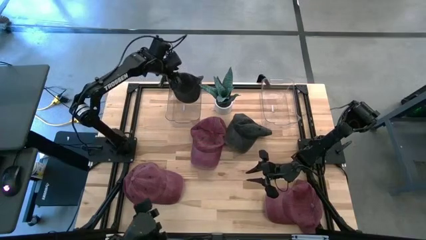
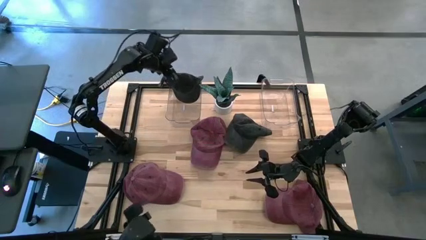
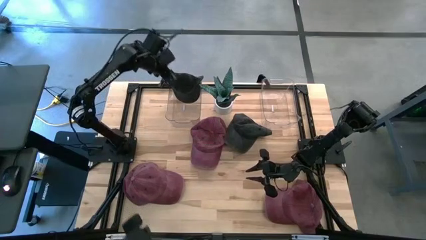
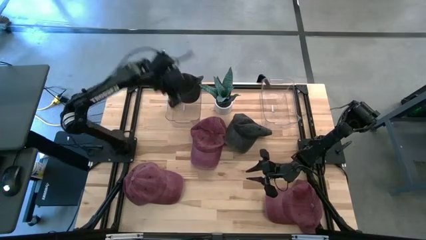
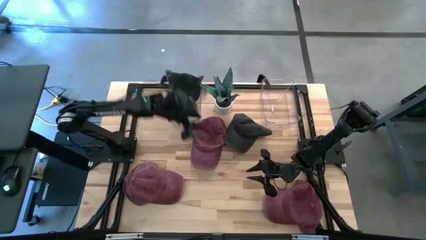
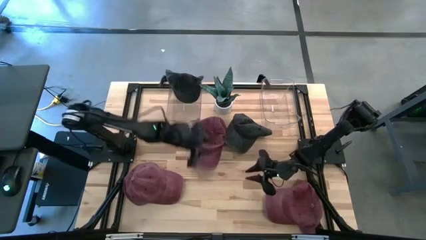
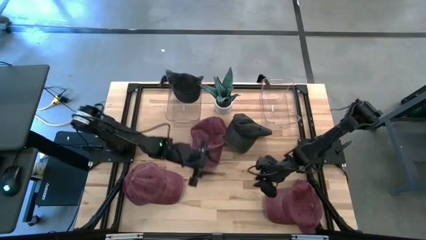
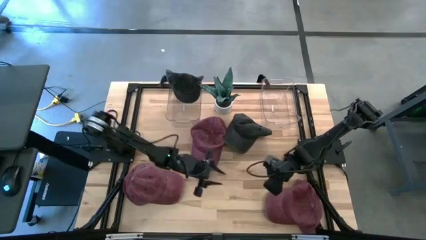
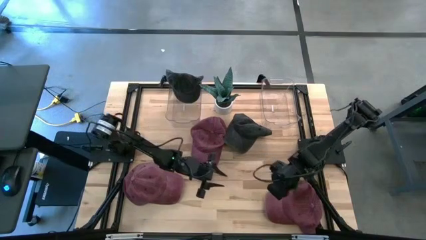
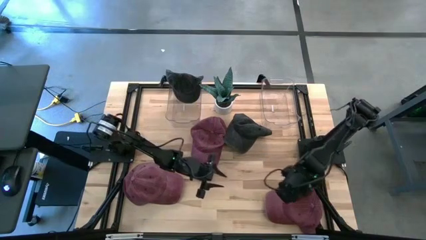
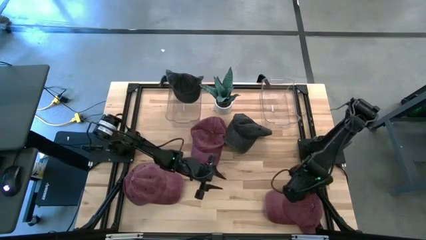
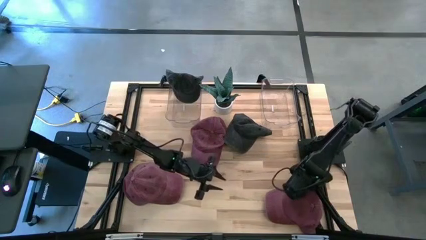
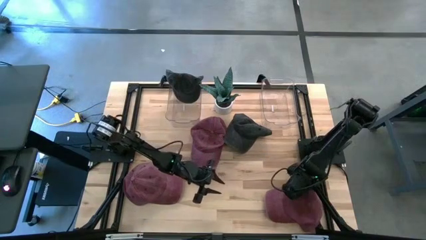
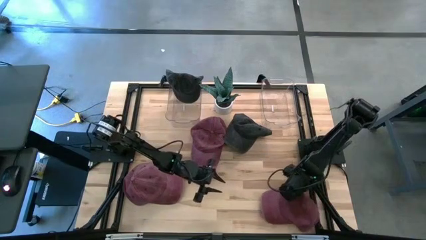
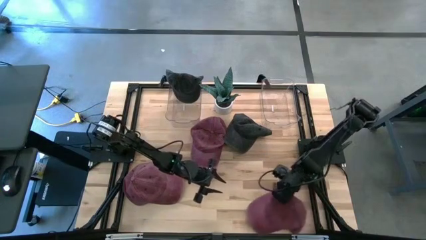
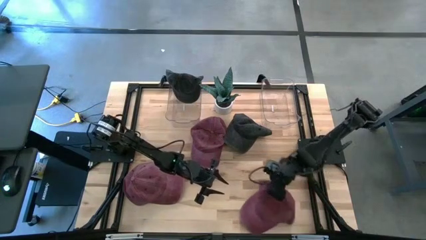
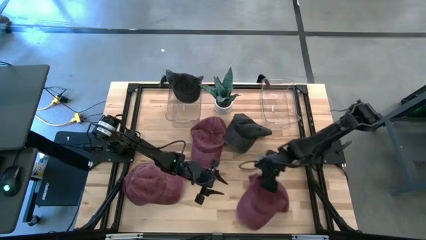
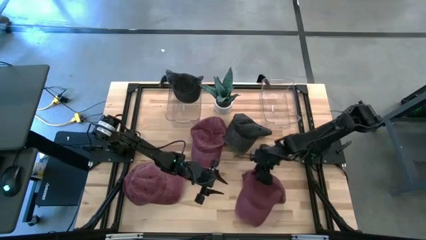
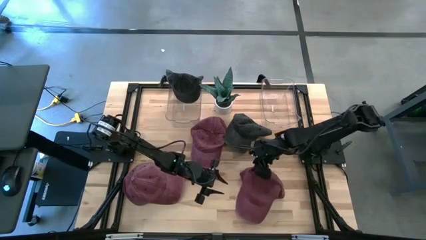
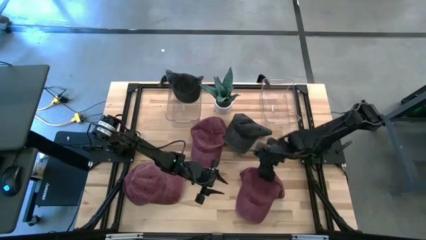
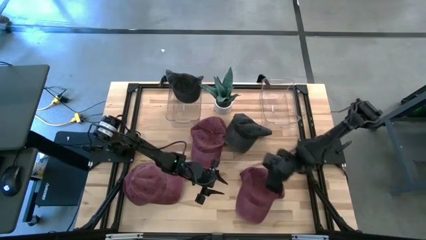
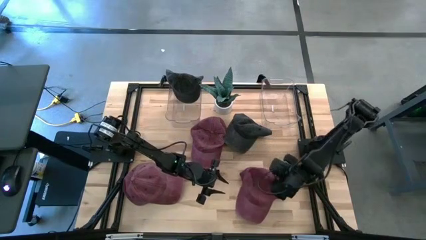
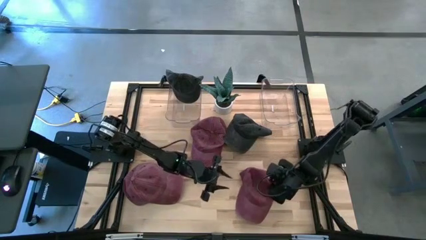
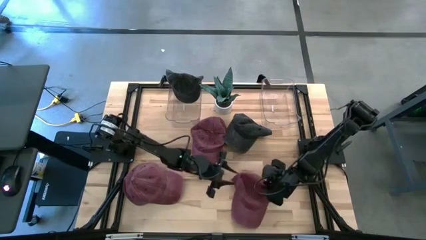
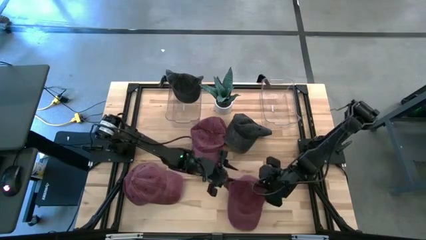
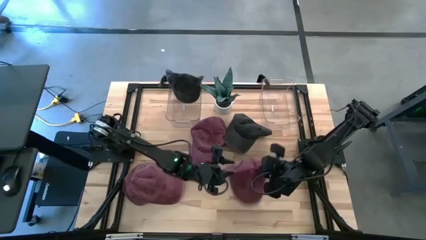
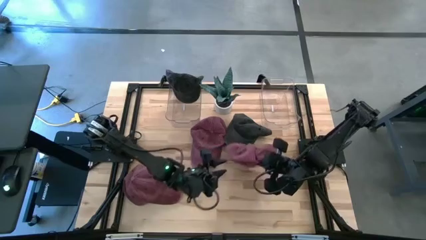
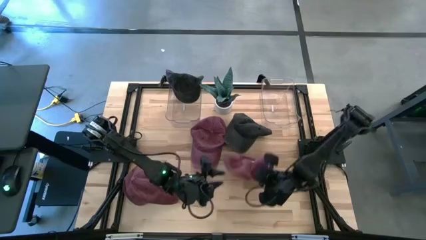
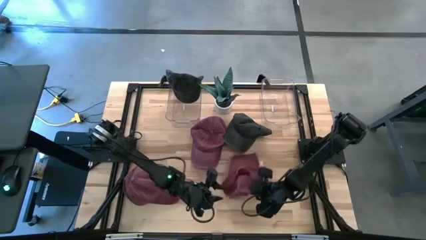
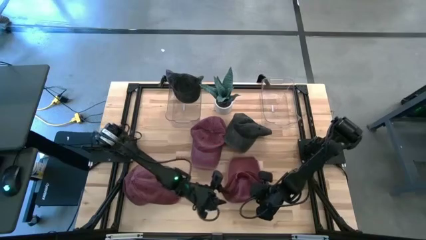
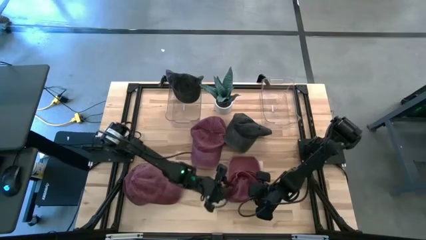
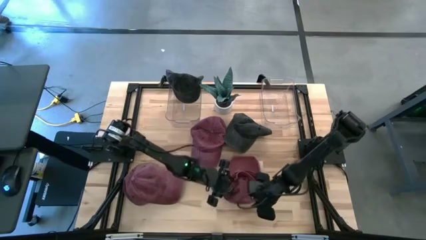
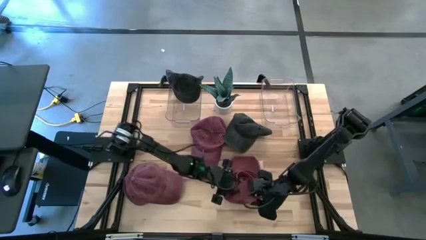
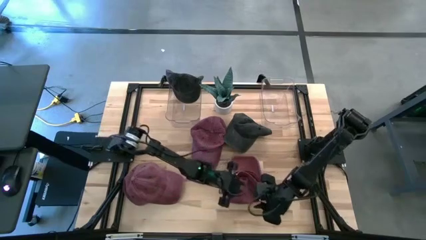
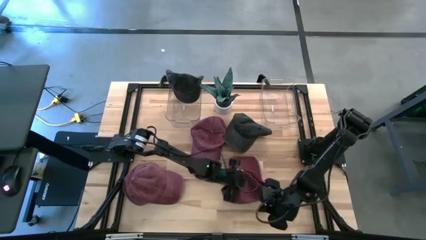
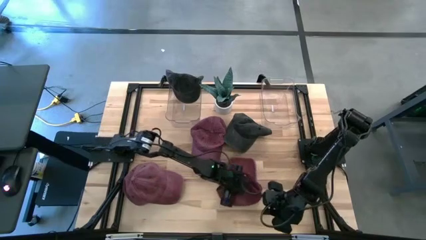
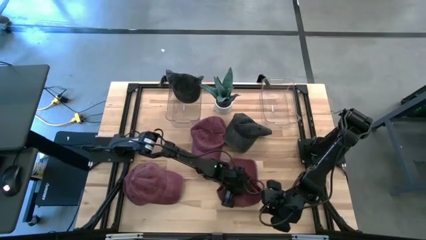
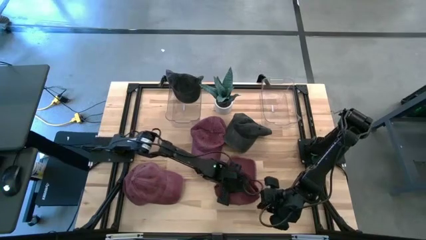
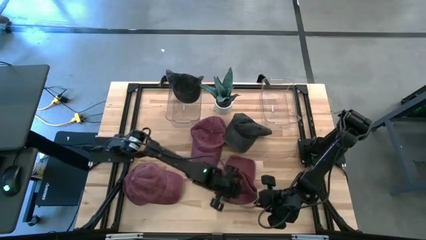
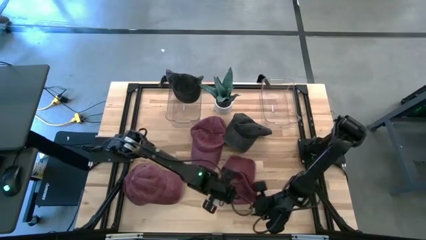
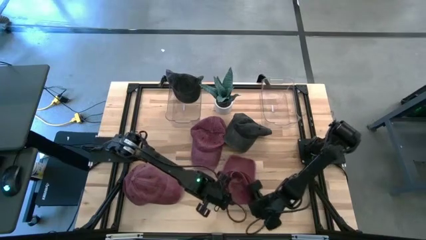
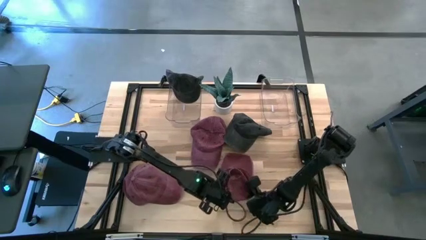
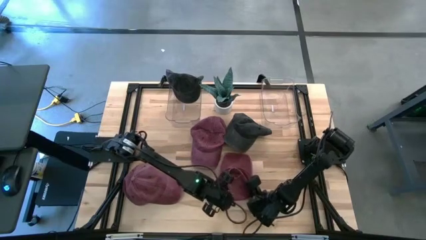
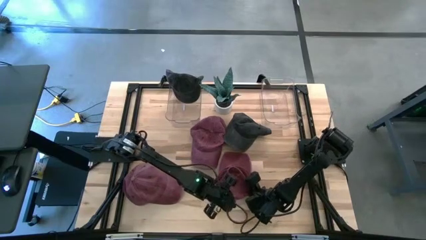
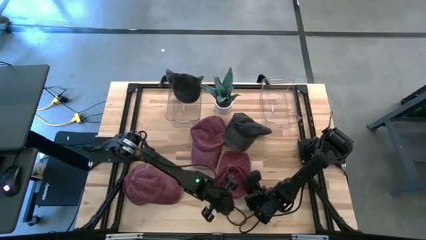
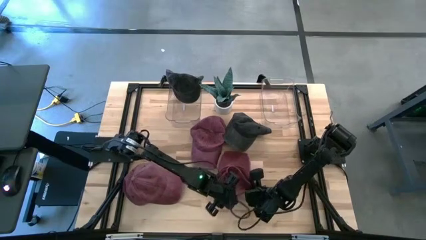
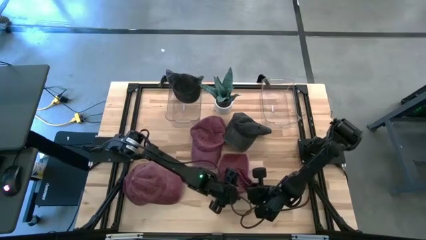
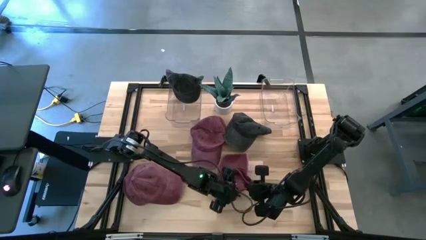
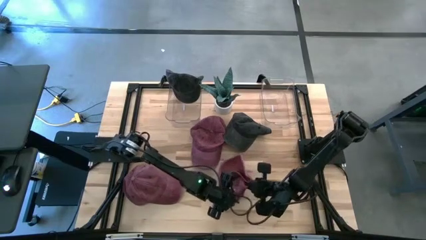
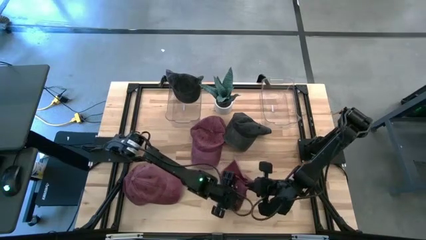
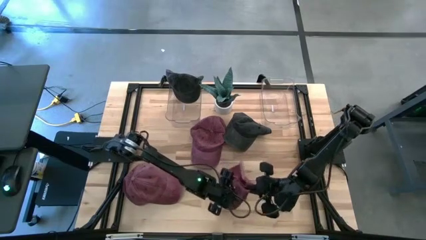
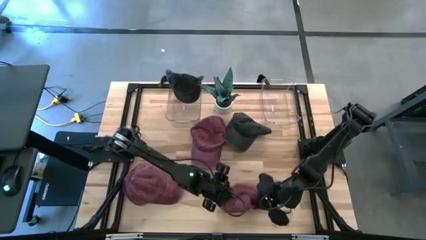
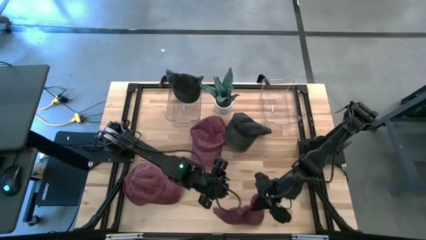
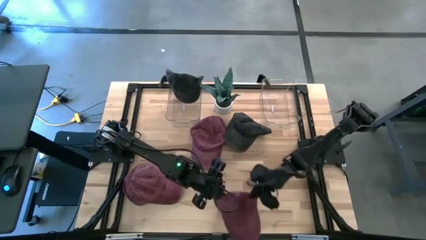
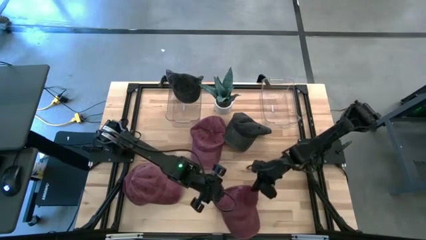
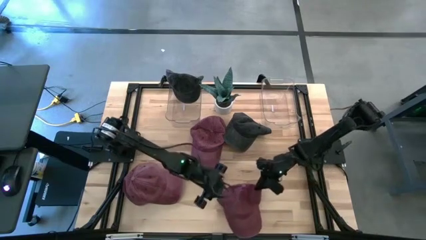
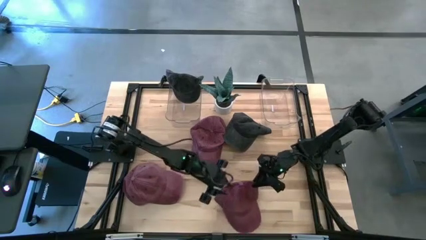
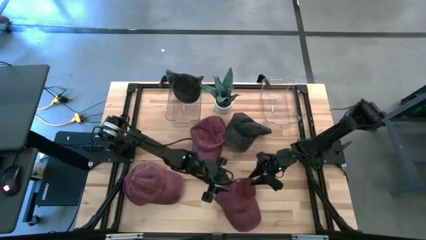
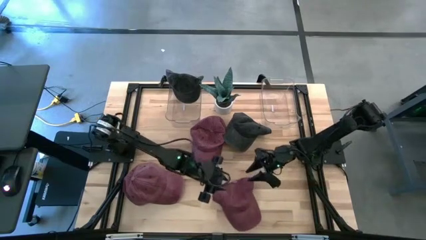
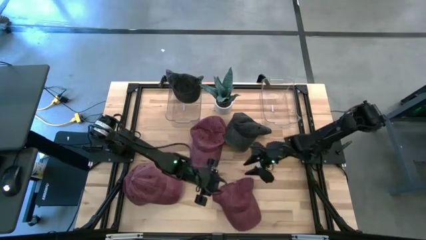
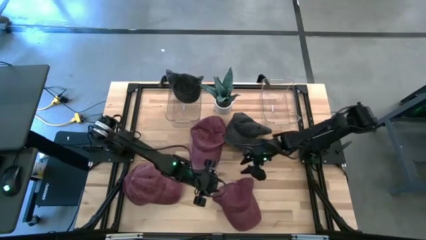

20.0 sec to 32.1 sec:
Task: Pick & Place hat
Put the bottom right red cap into the right transparent bin

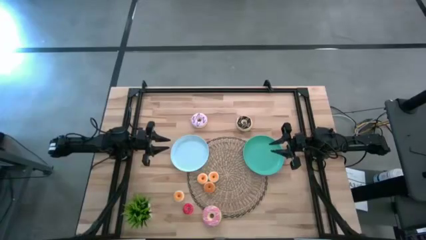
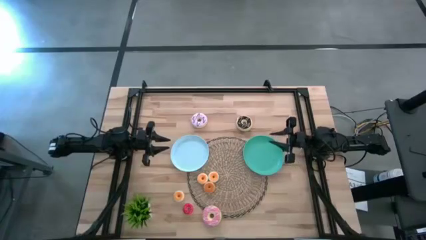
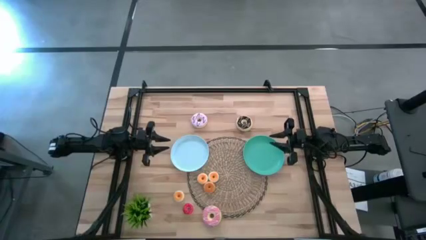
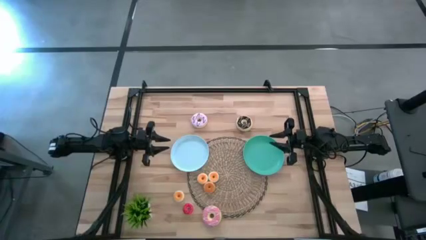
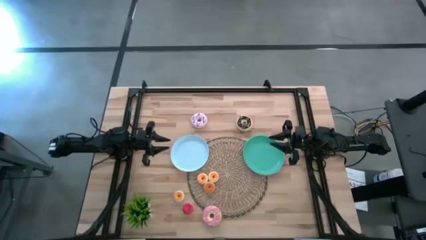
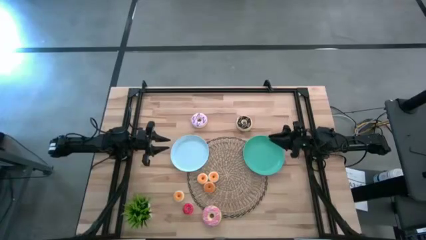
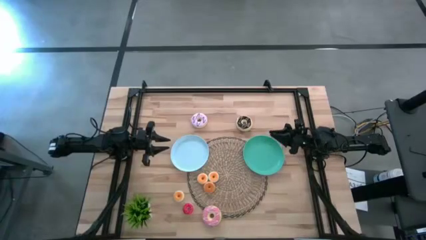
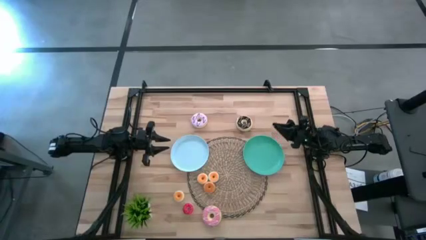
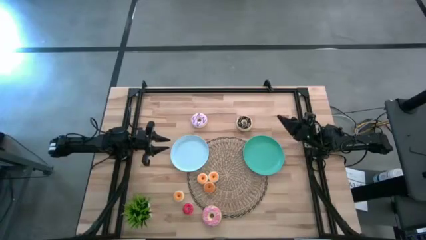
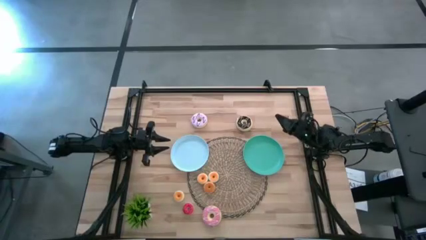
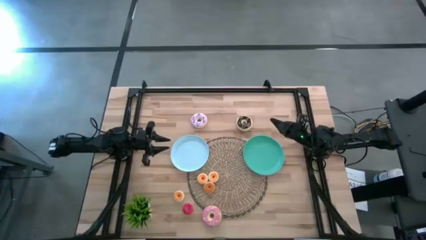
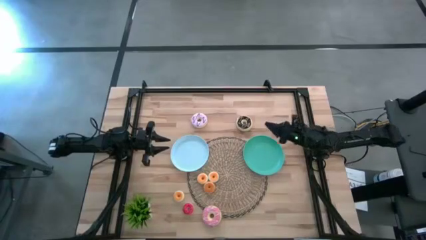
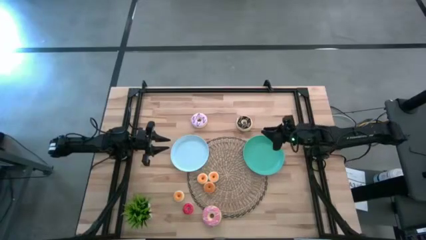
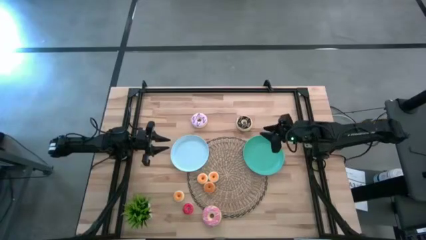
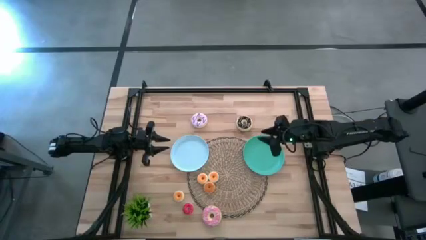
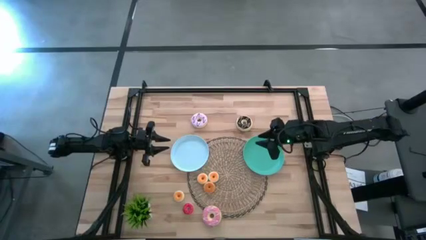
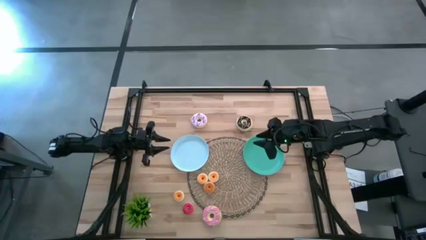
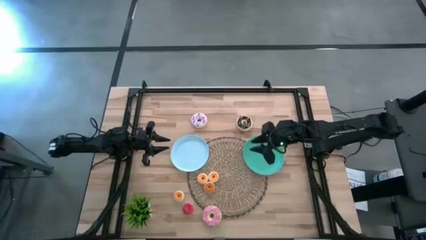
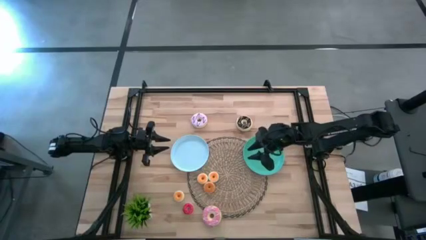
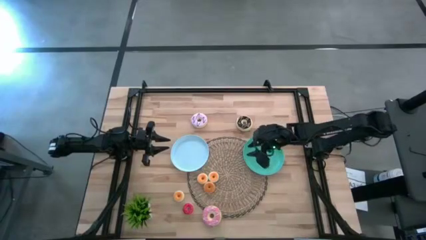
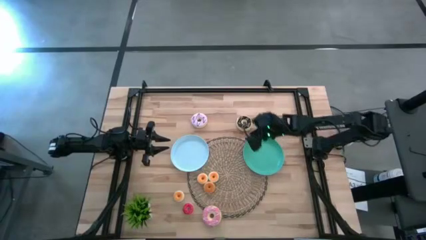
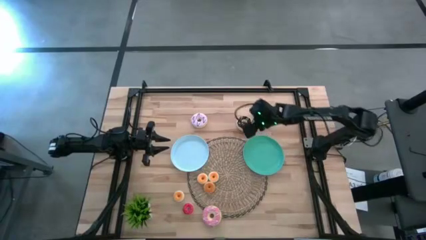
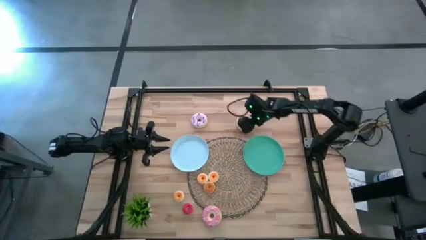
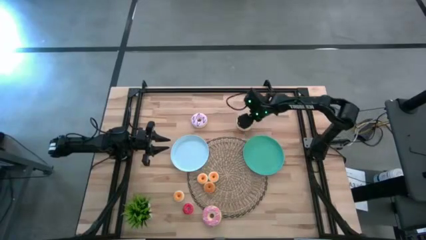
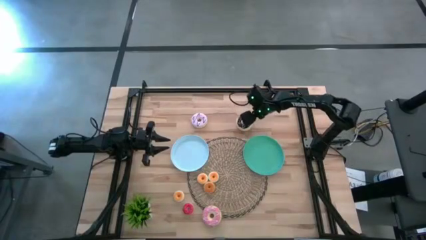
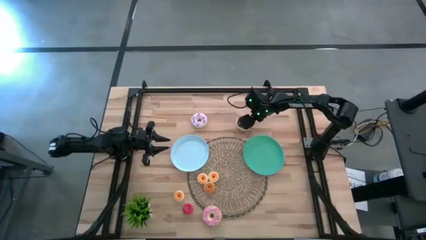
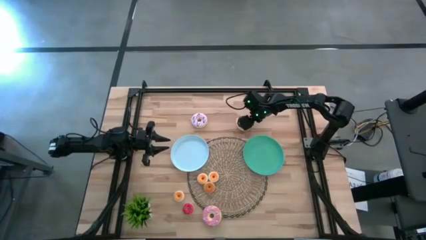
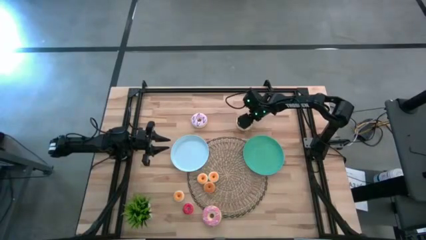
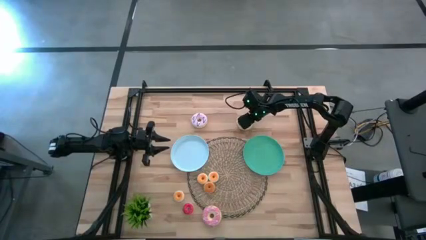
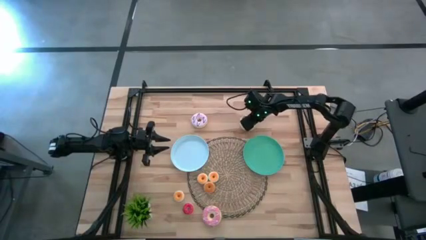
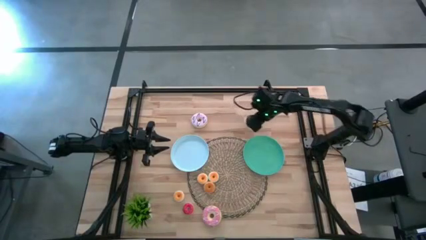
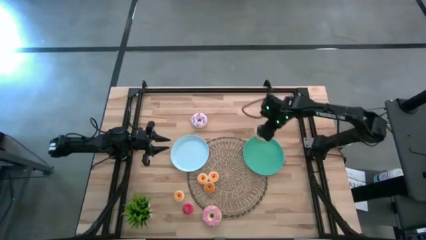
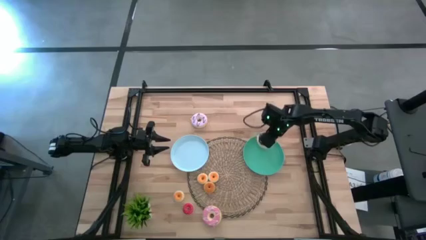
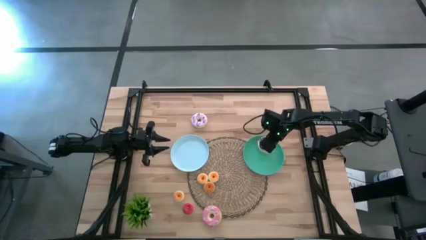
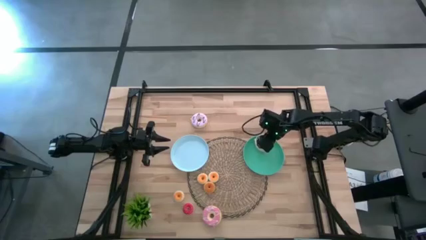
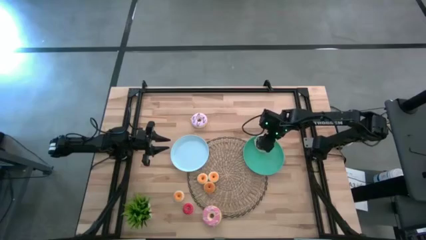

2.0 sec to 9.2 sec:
Task: Pick & Place donuts
Put the large black donut on the green plate
